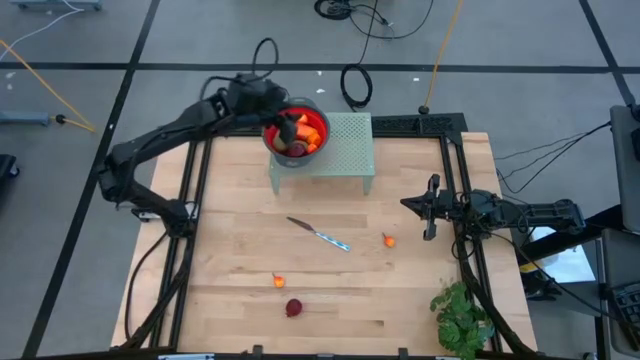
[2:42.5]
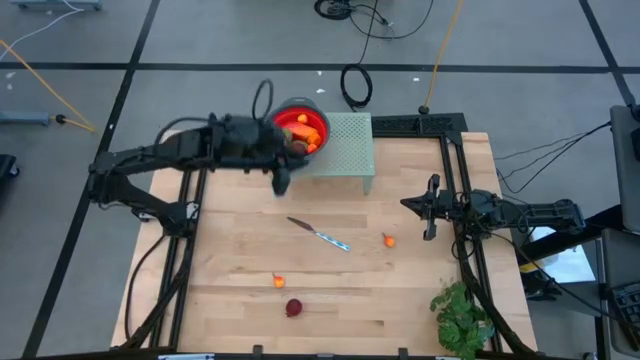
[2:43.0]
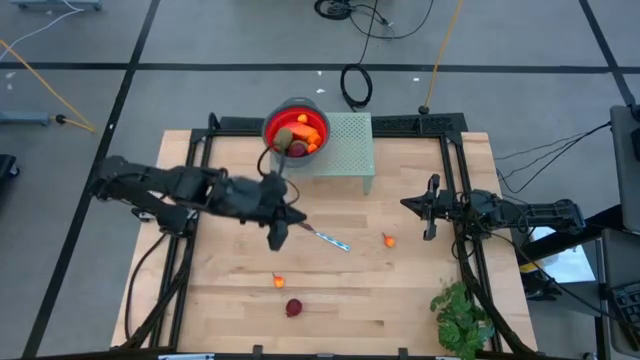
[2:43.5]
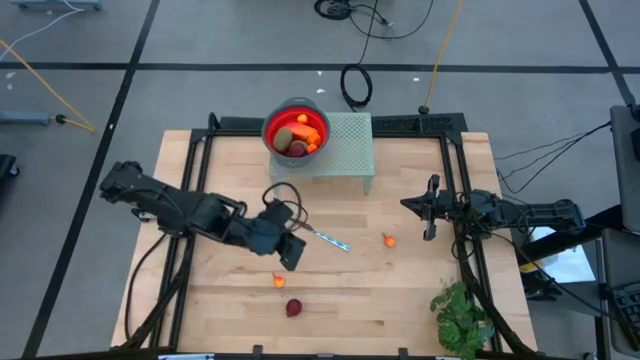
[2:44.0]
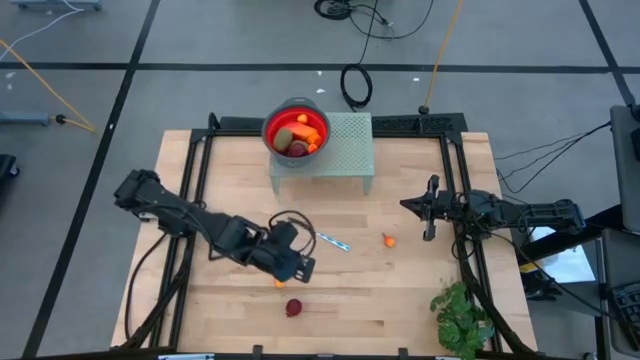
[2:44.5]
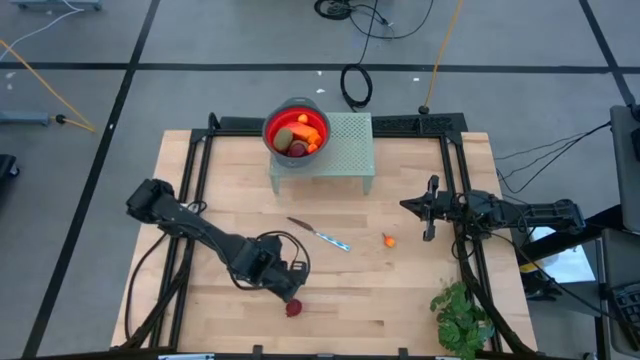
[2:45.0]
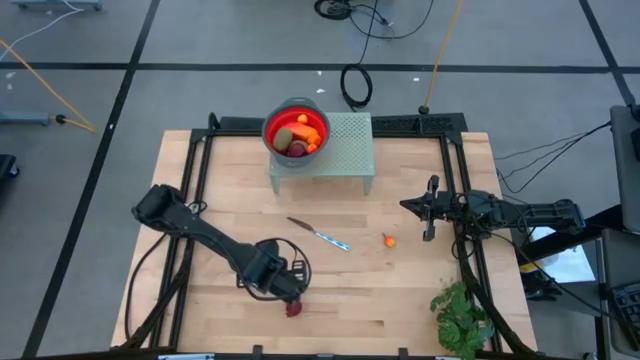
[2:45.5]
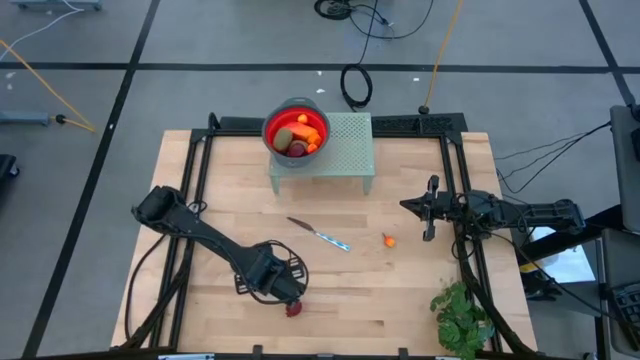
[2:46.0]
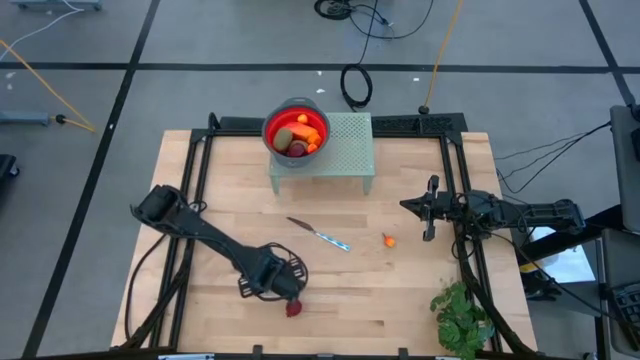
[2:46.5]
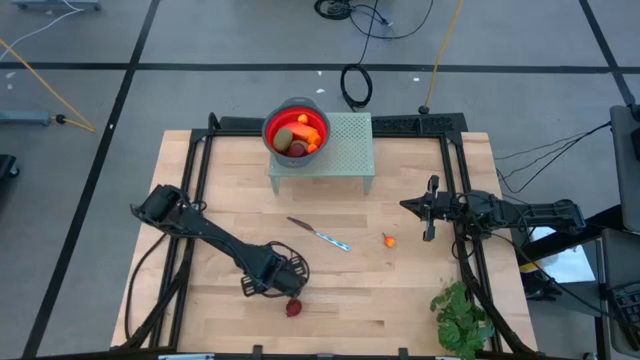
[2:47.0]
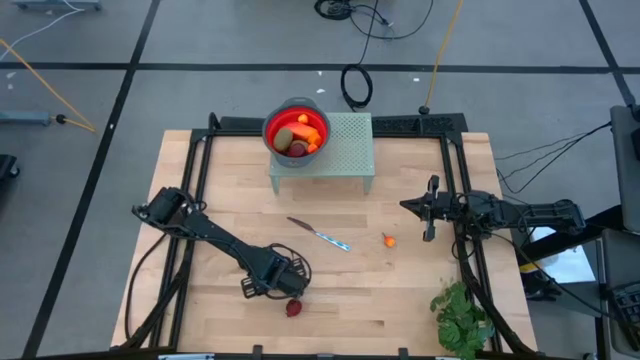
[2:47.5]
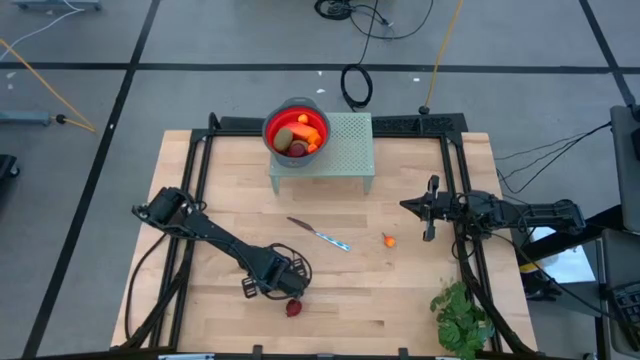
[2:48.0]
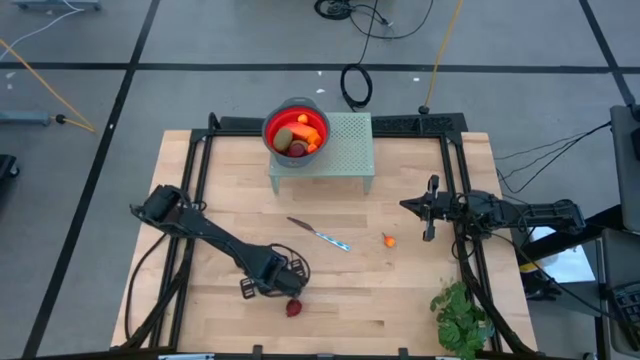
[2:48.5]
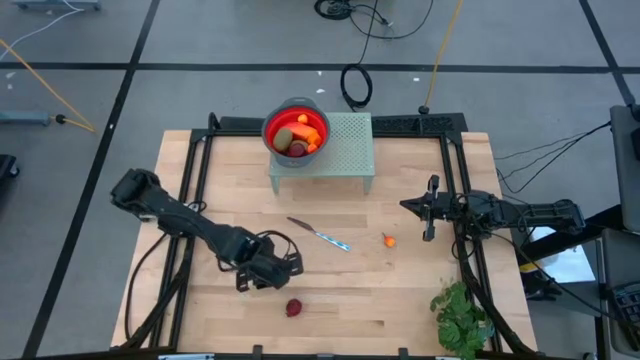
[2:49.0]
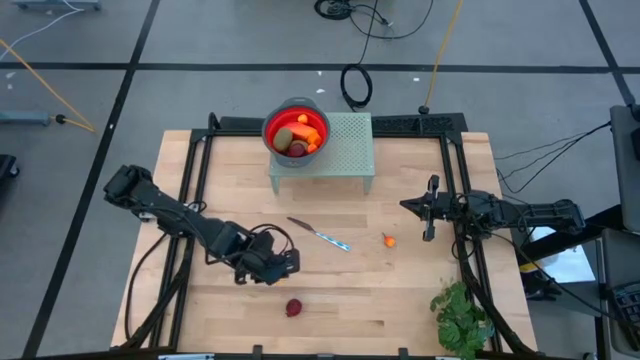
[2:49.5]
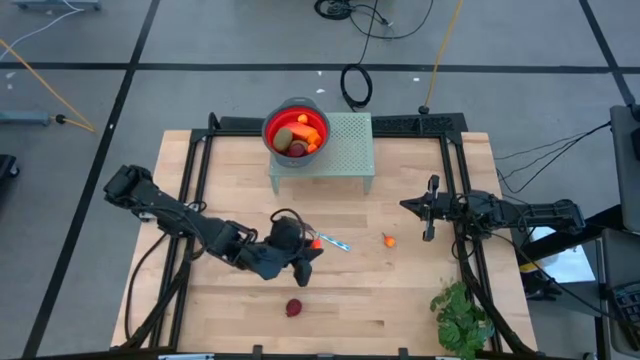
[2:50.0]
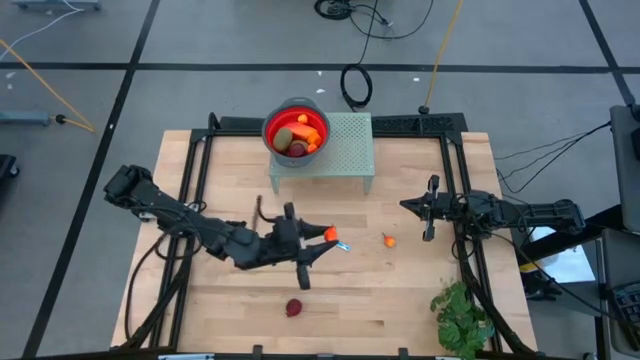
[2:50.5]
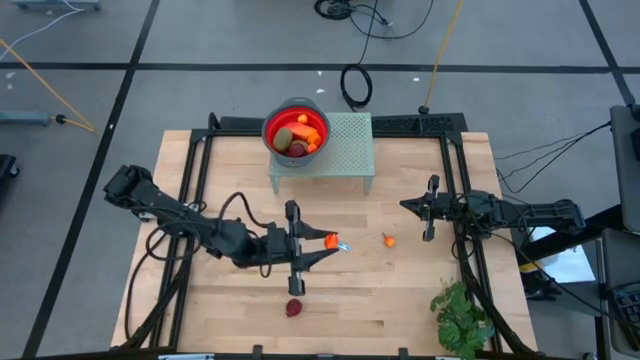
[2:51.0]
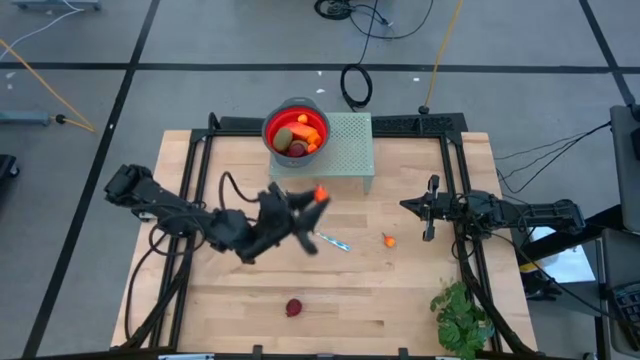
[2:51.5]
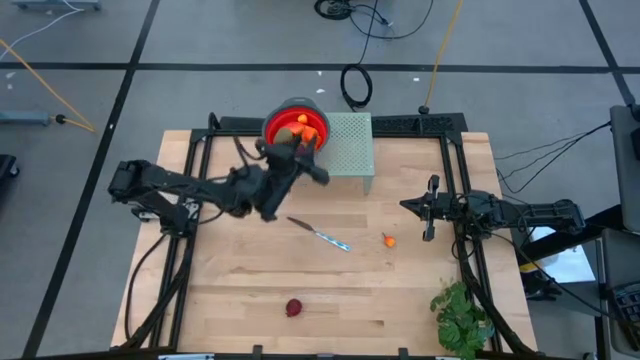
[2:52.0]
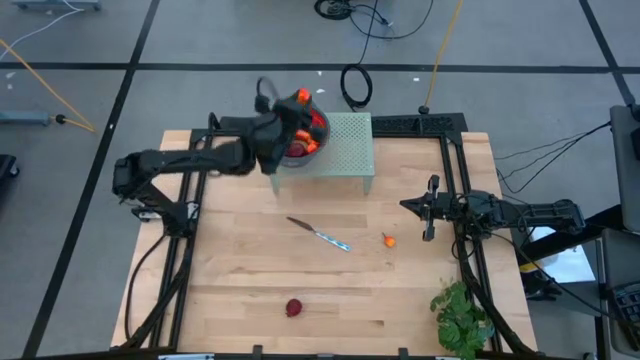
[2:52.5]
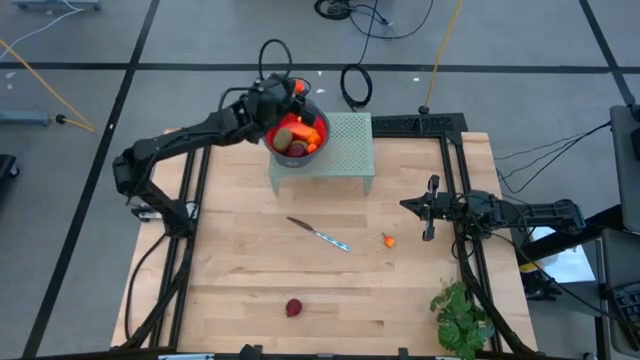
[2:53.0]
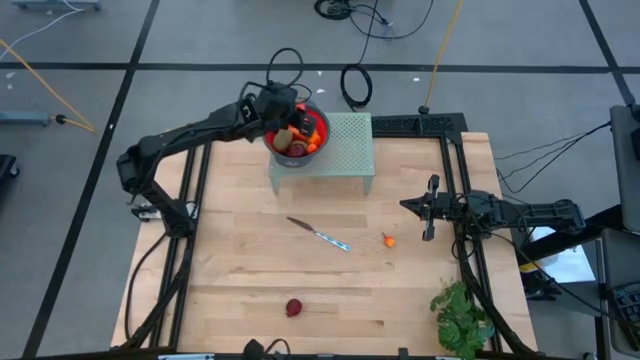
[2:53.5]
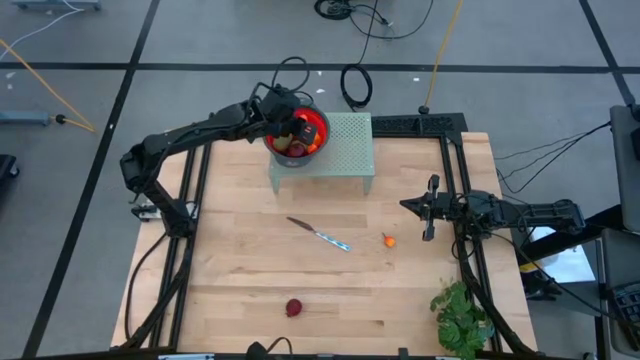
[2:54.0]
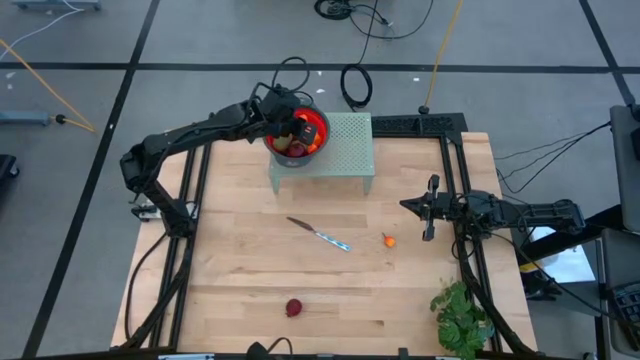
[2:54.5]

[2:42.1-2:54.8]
Task: Pick & Place Fruit
Put the peach into the red strainer bowl

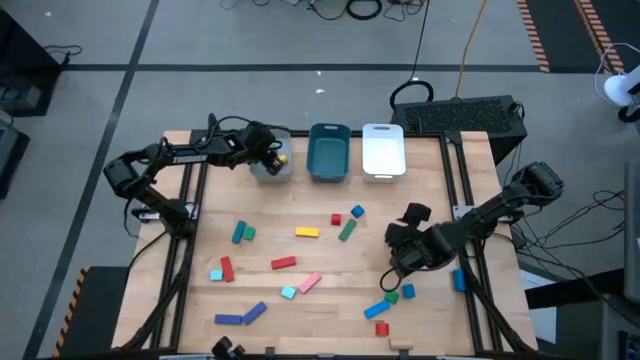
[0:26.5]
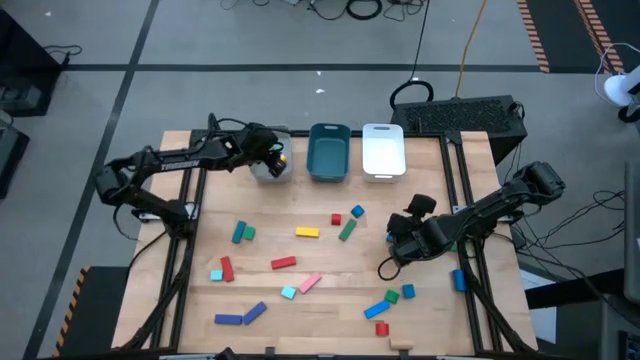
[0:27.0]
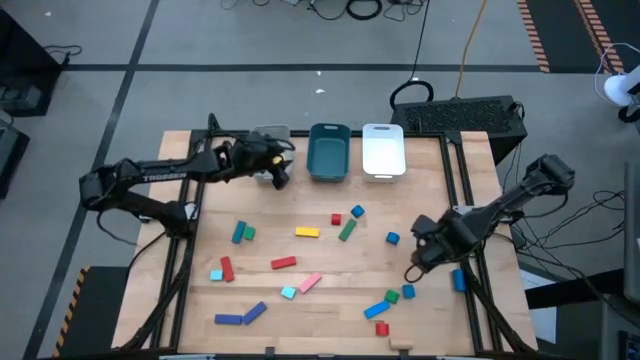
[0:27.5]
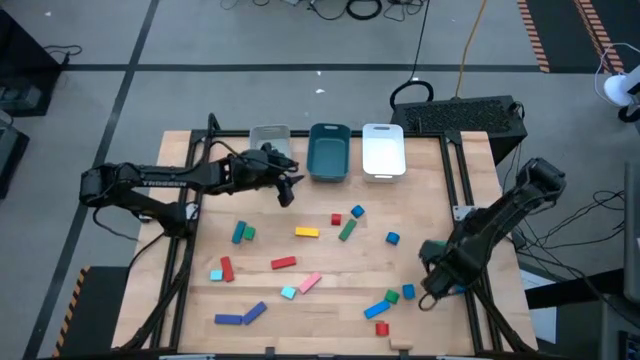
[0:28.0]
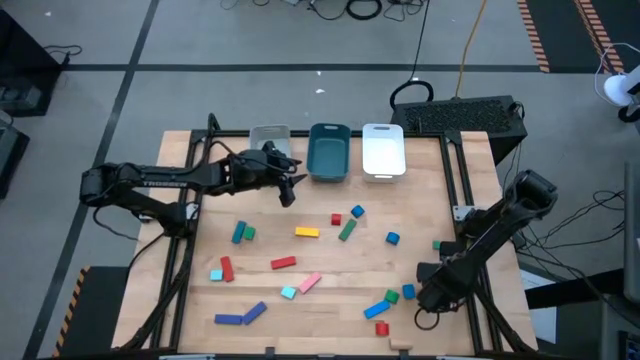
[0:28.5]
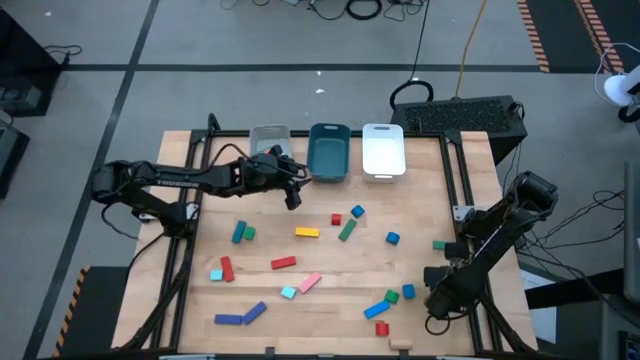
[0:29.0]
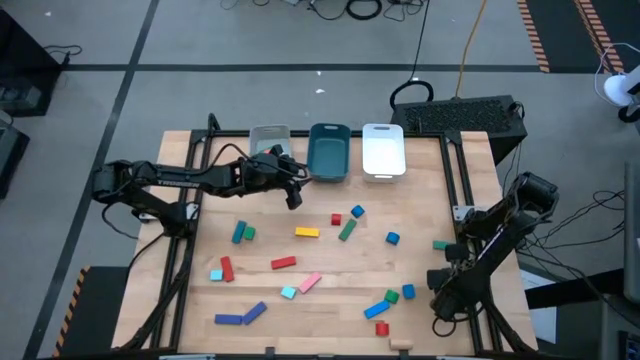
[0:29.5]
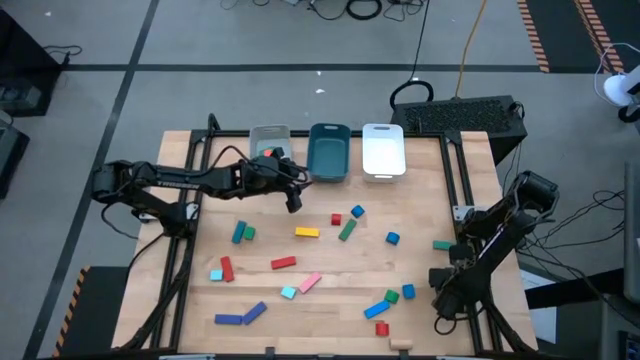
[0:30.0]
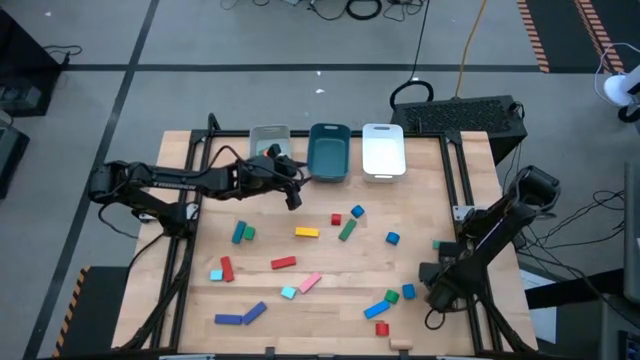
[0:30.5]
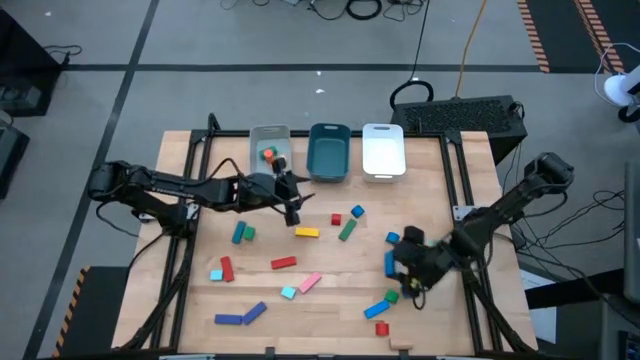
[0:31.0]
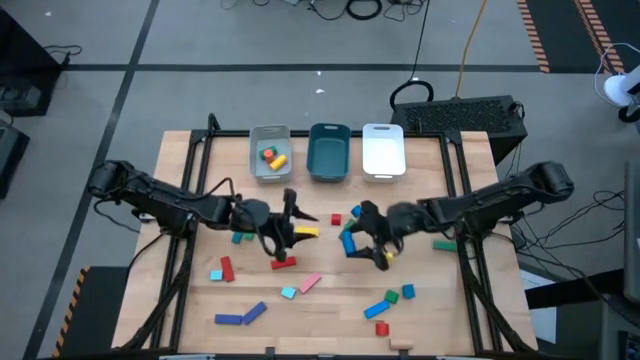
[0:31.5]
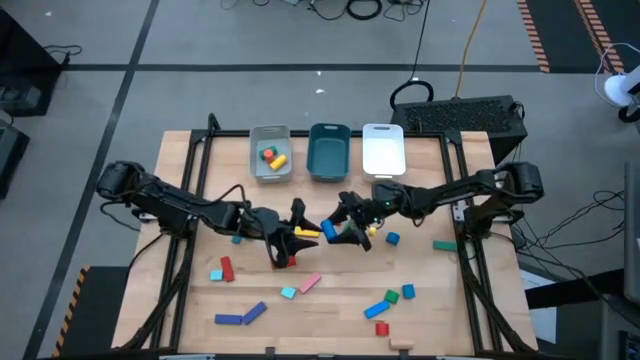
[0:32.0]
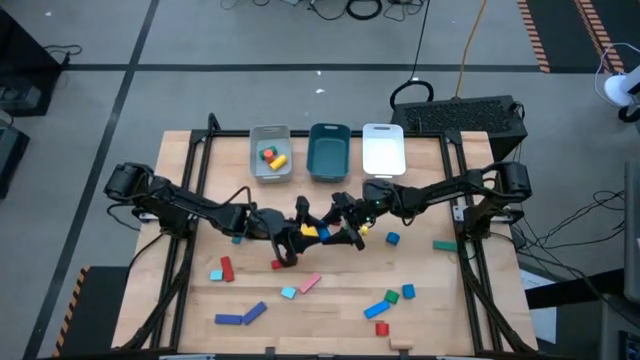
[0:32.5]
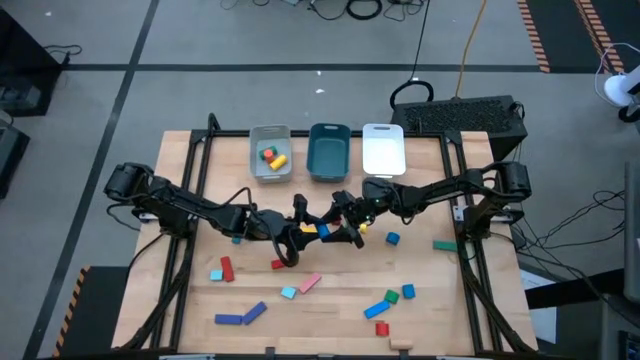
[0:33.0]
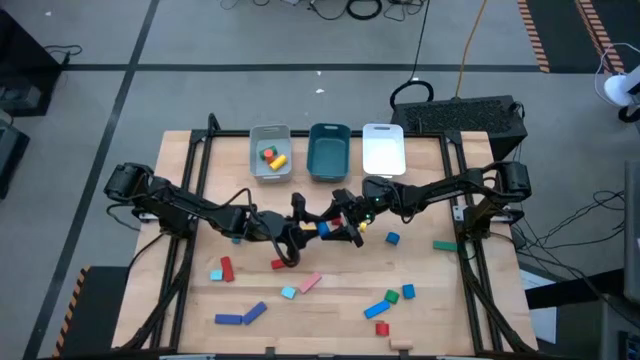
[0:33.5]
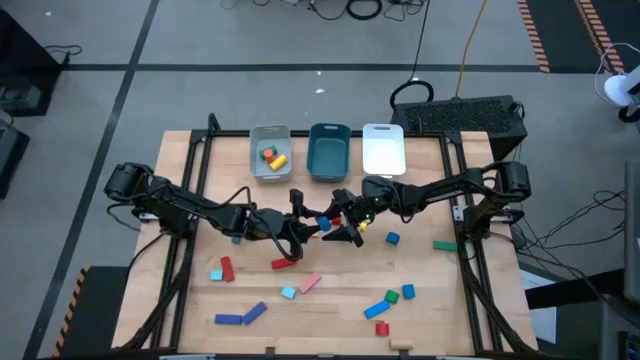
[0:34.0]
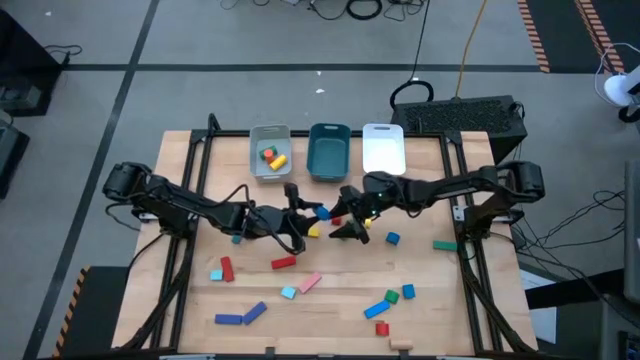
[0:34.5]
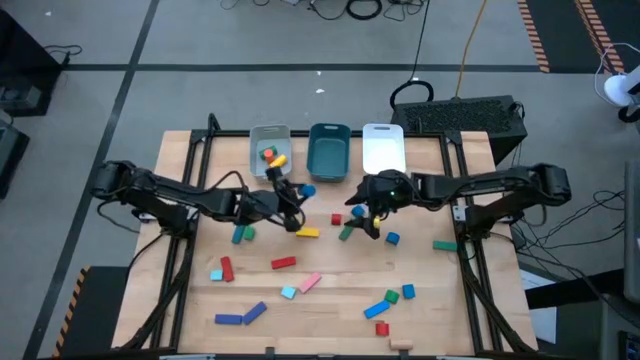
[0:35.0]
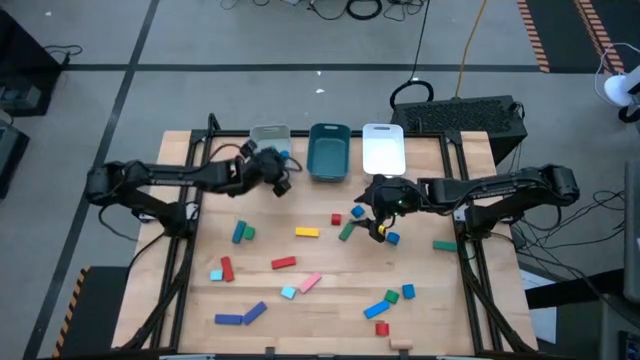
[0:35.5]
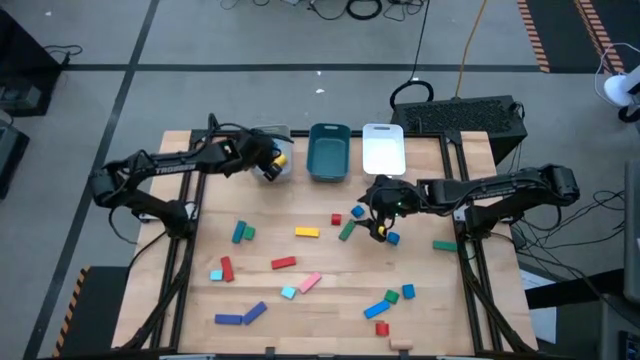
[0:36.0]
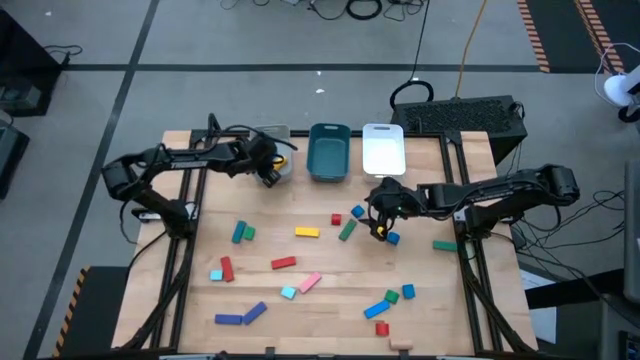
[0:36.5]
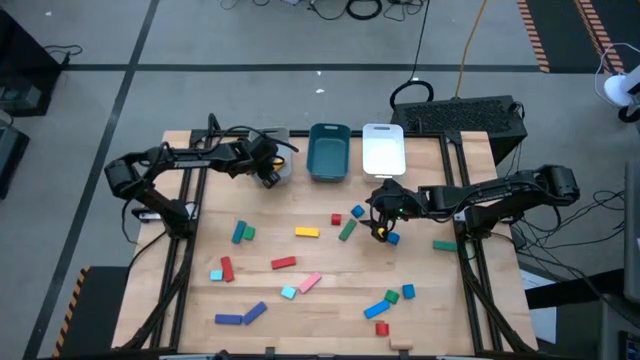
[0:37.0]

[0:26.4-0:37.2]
Task: Sort blocks by size
Put the blue cylinder block into the gray bin
